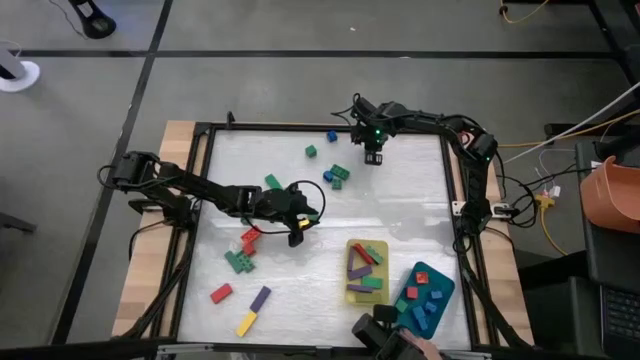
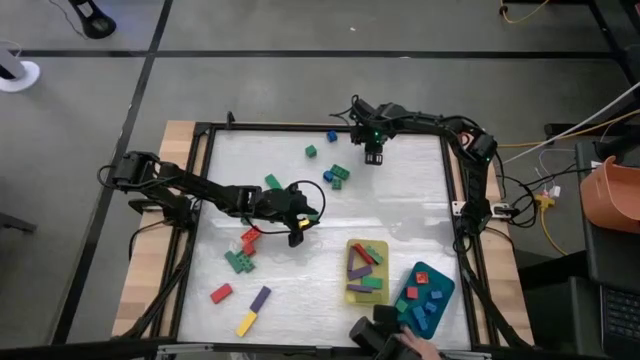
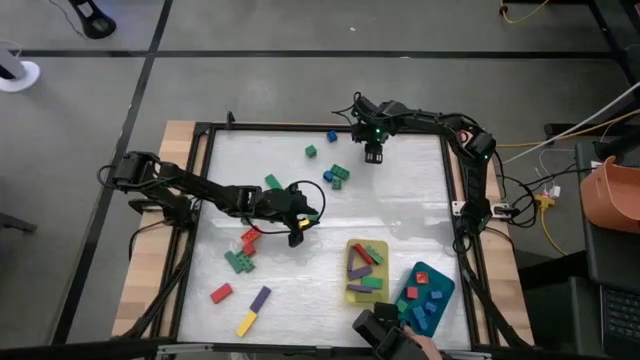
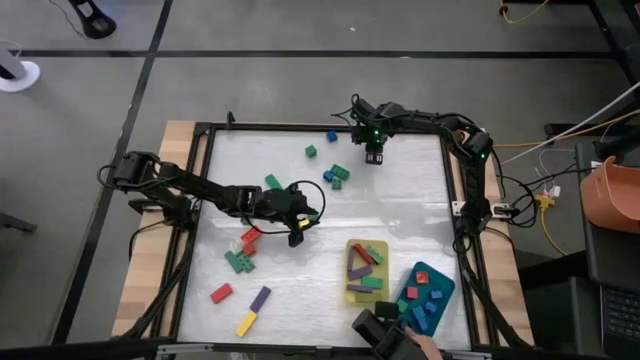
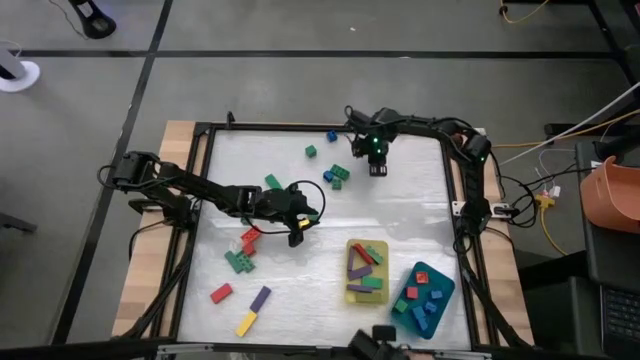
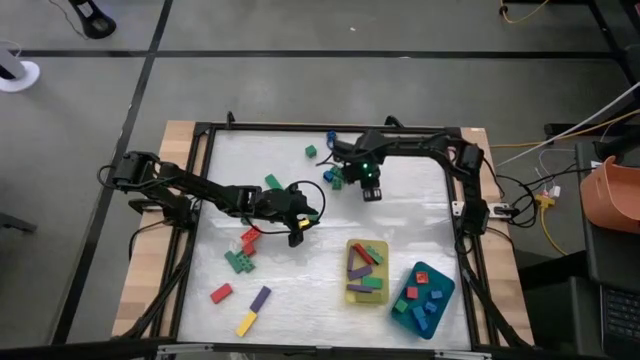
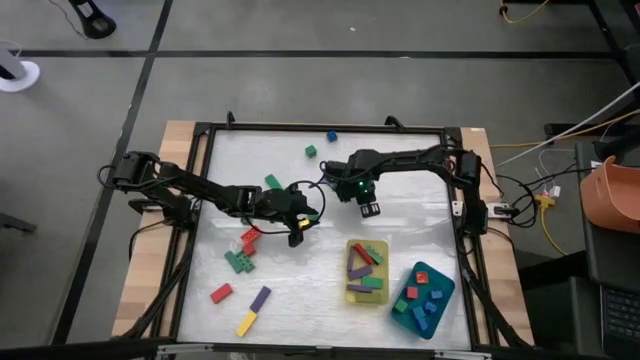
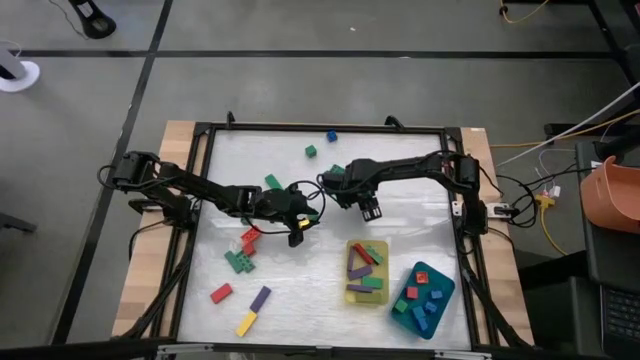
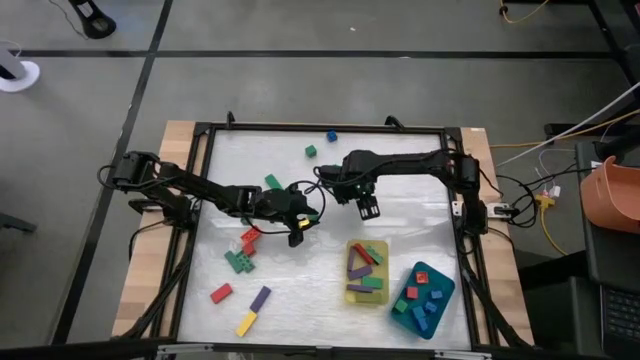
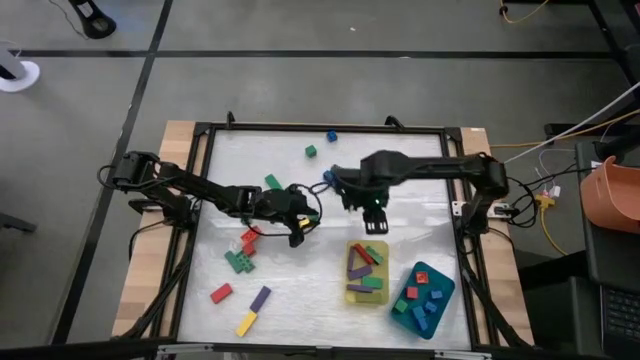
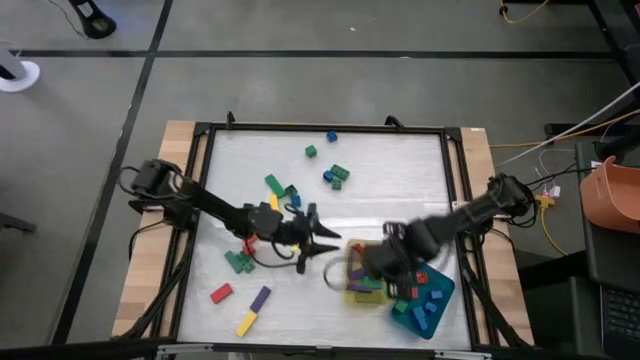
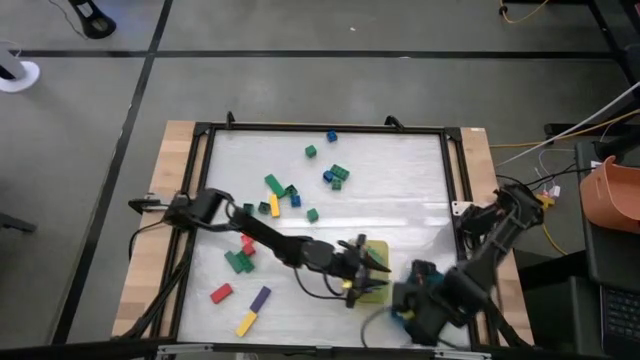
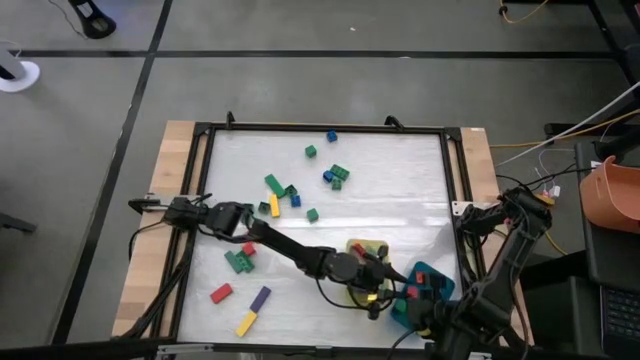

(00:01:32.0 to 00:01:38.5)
Task: Sort blocks by size
Put the small green game piece into the blue bin

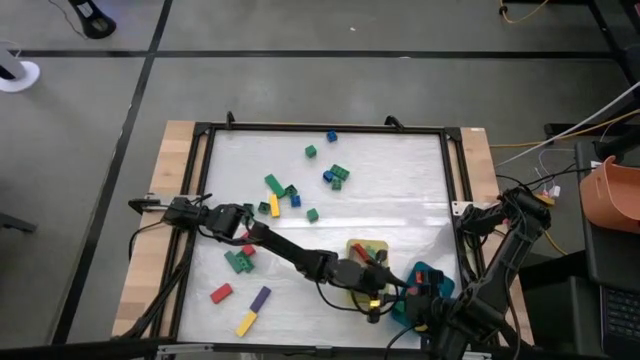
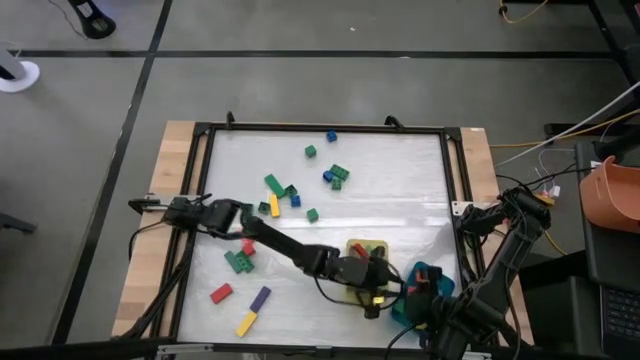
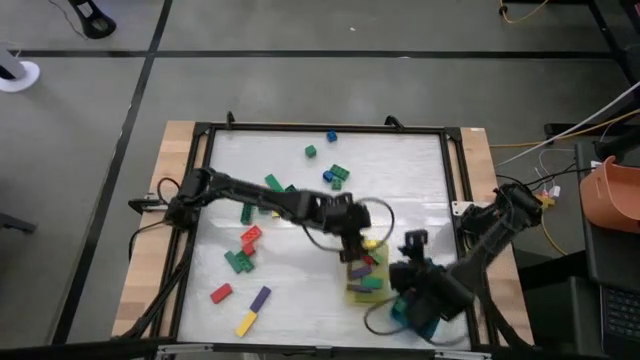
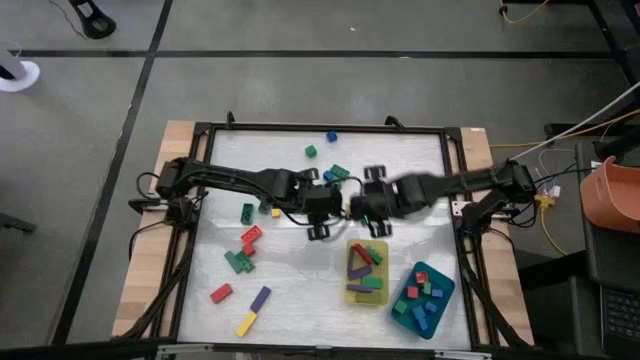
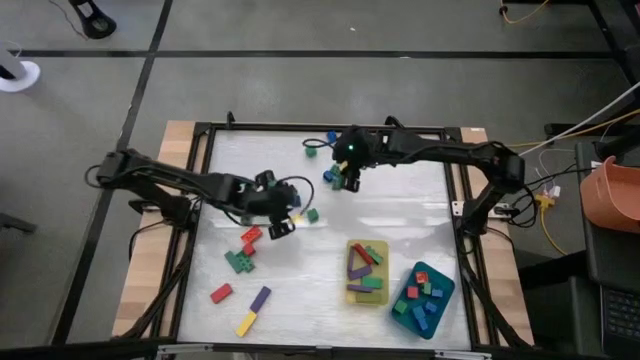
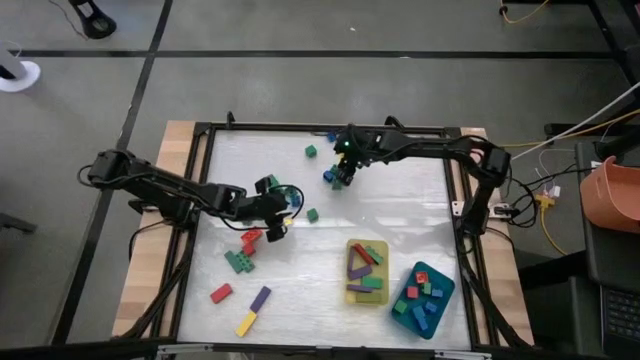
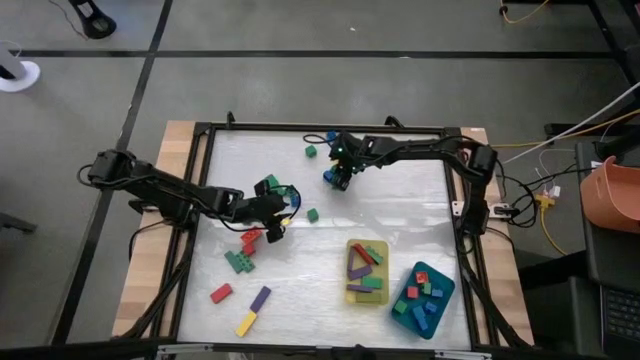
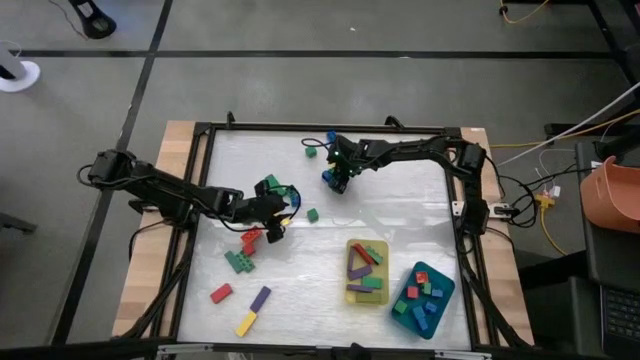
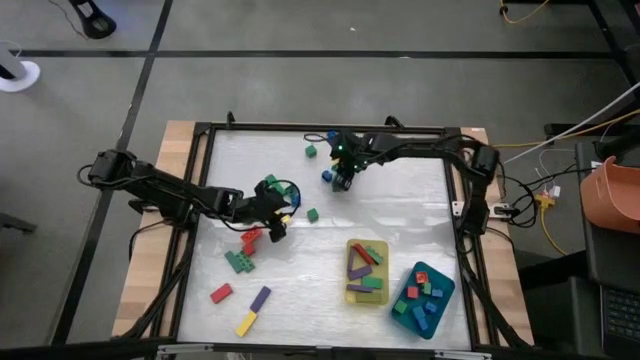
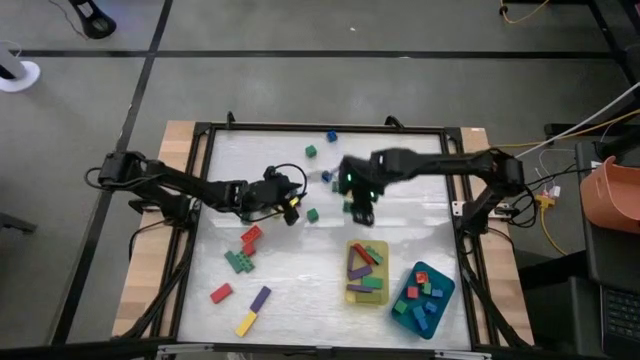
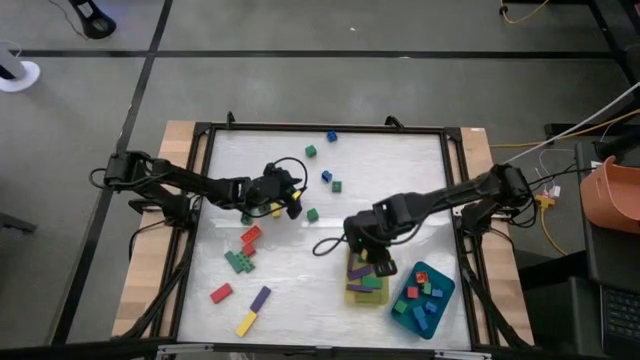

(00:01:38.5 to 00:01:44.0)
Put the long green game piece into the yellow bin

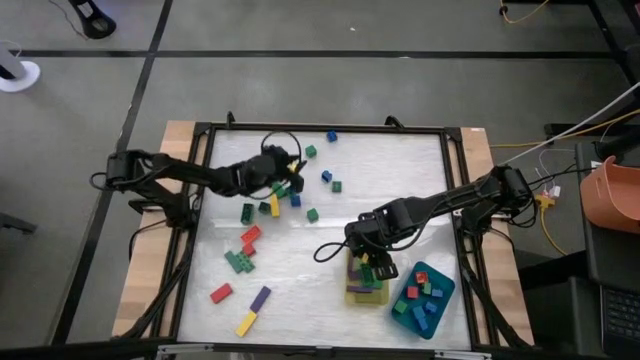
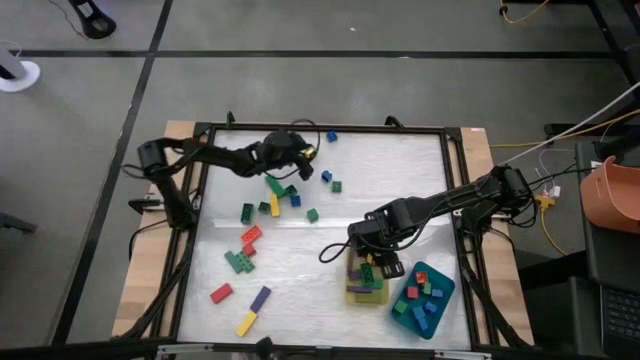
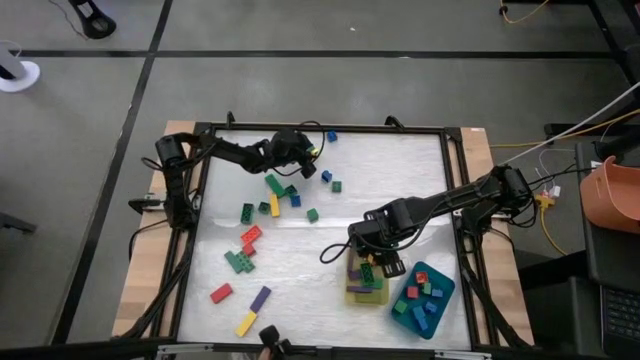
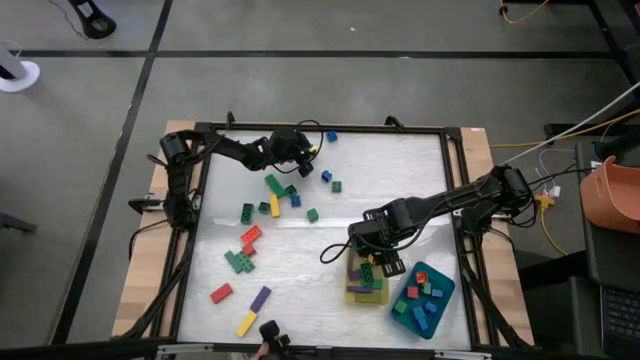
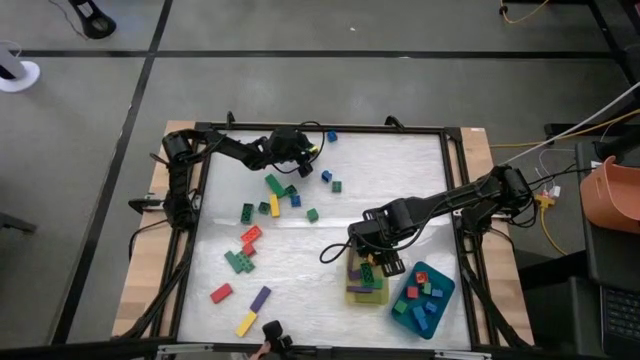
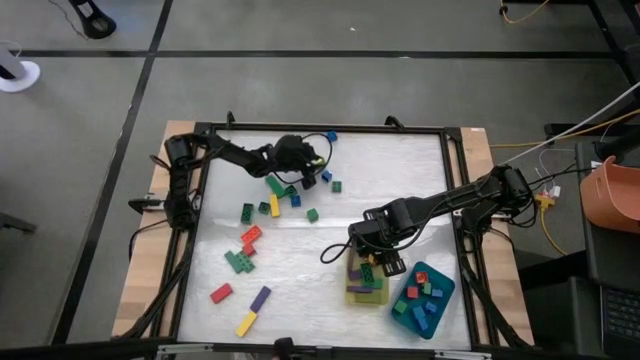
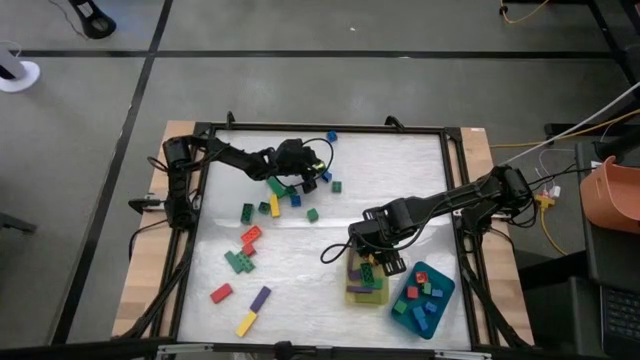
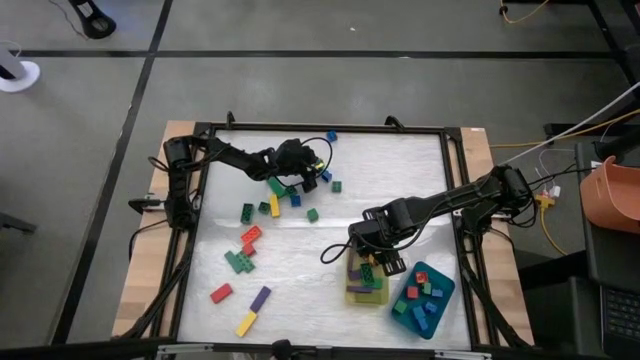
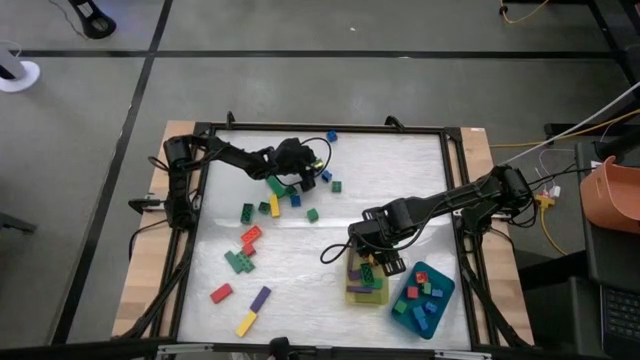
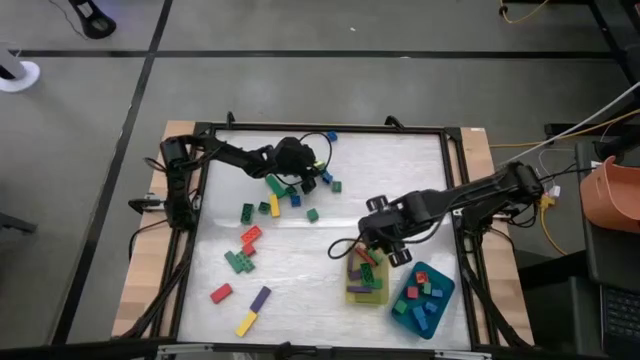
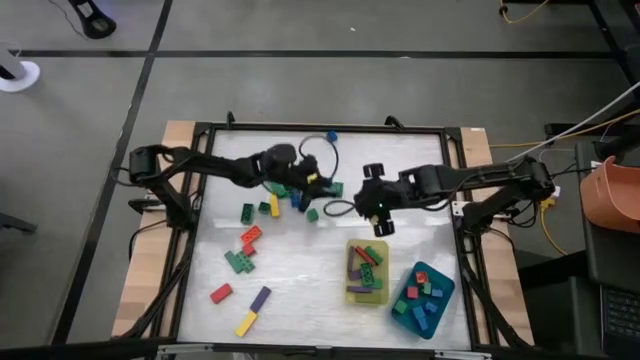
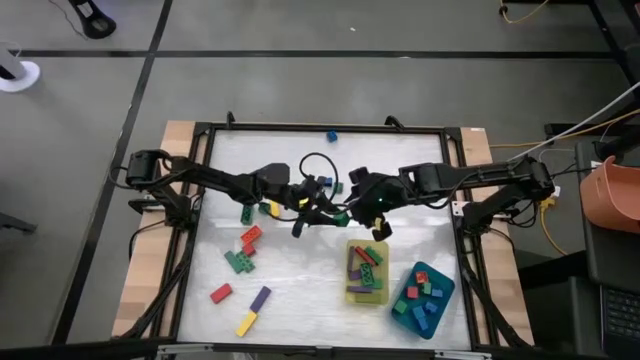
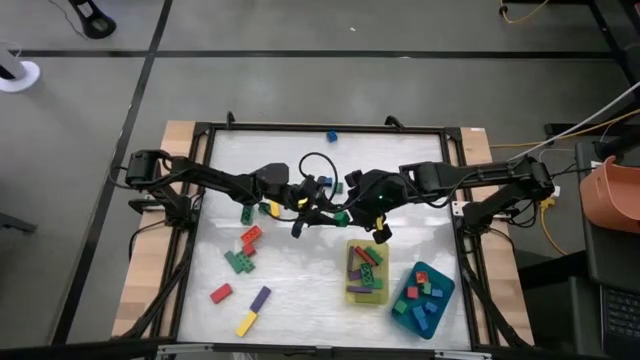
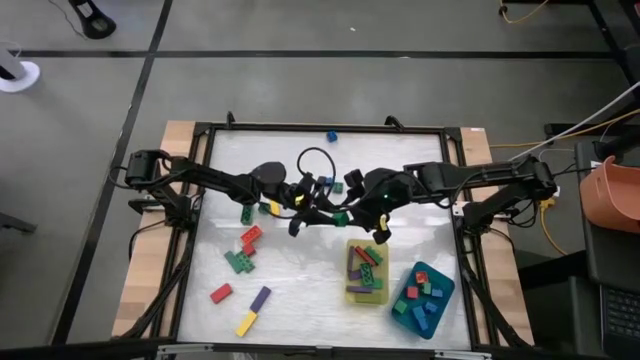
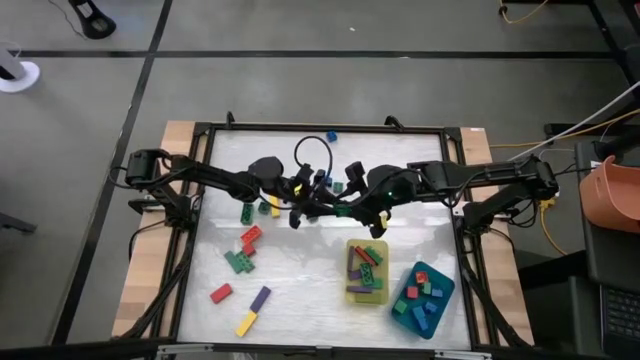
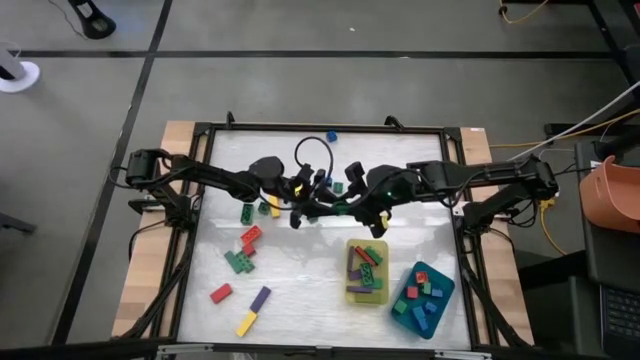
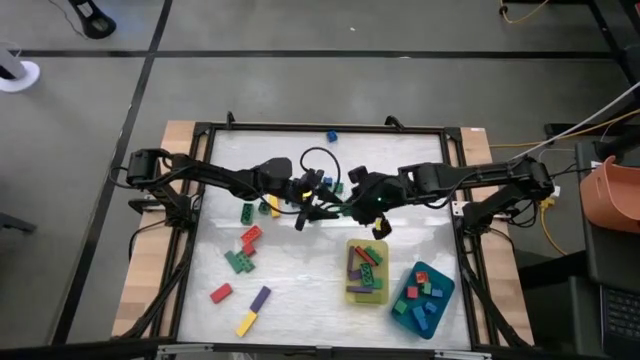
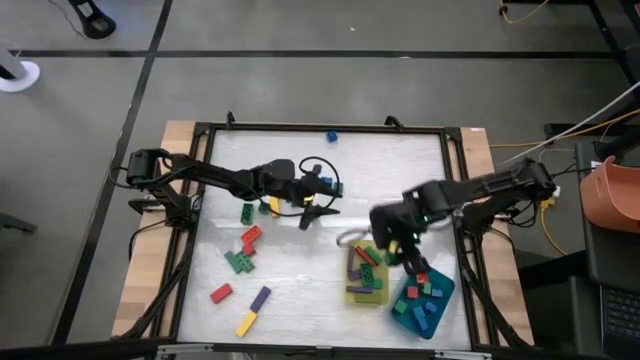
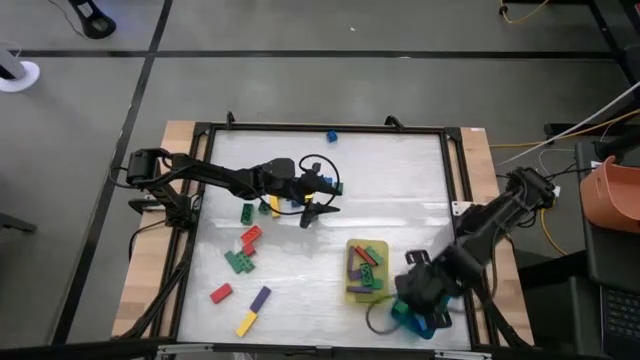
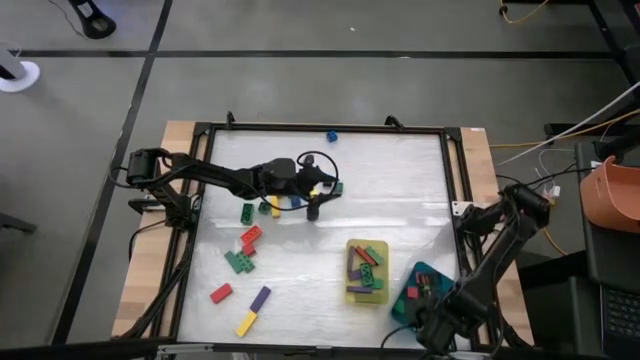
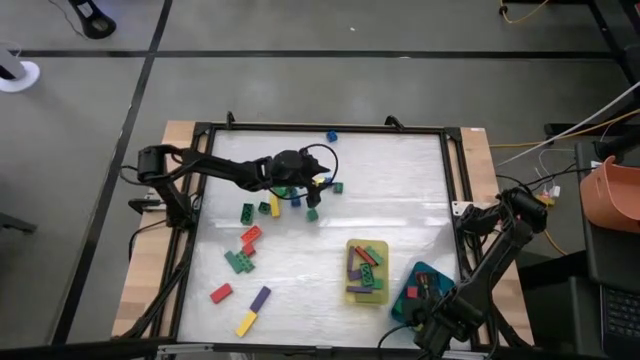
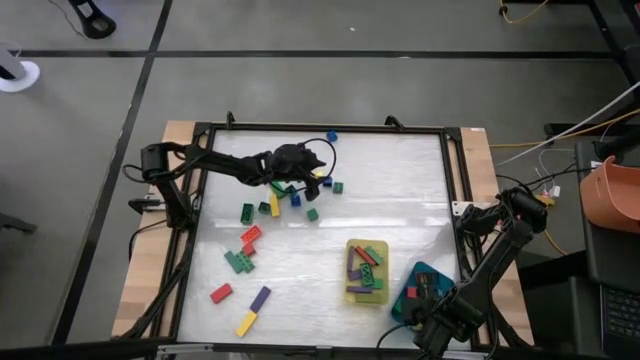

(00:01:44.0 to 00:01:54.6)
Put the small green block into the blue bin
